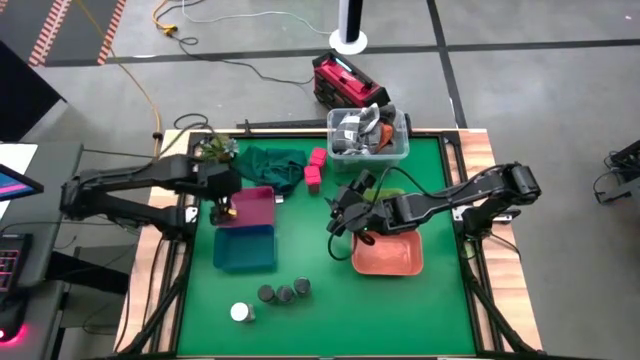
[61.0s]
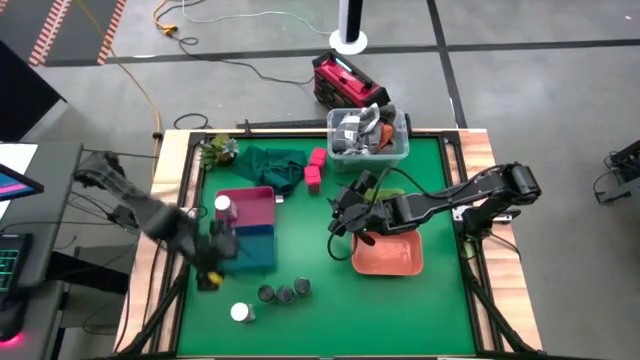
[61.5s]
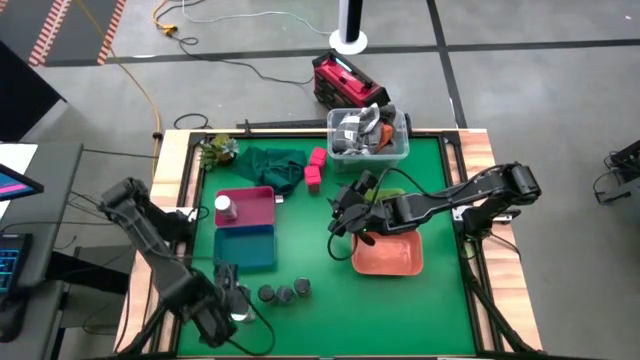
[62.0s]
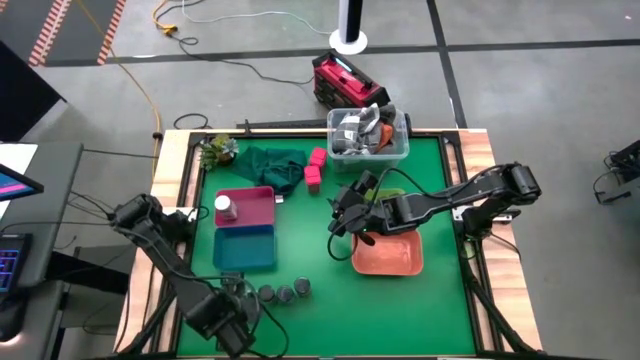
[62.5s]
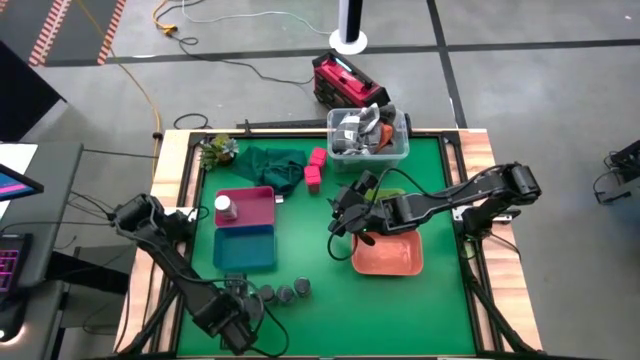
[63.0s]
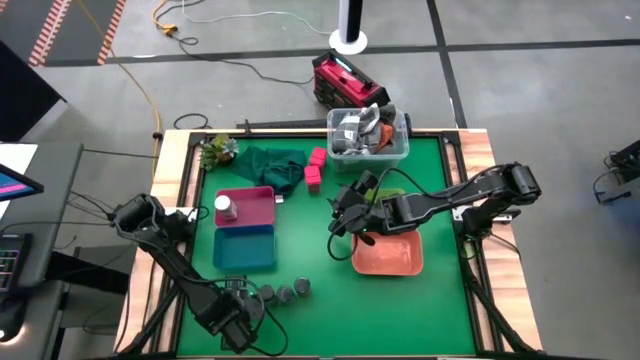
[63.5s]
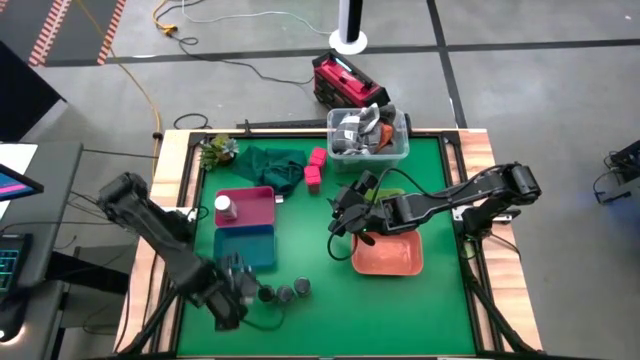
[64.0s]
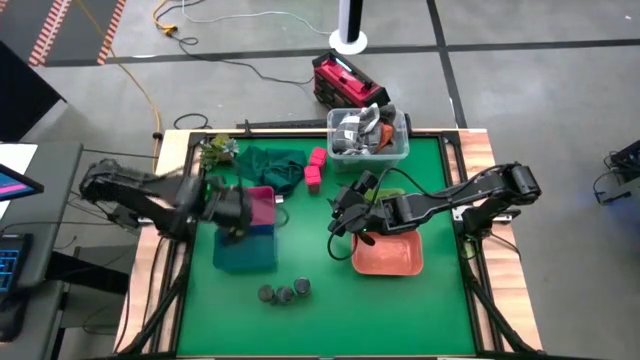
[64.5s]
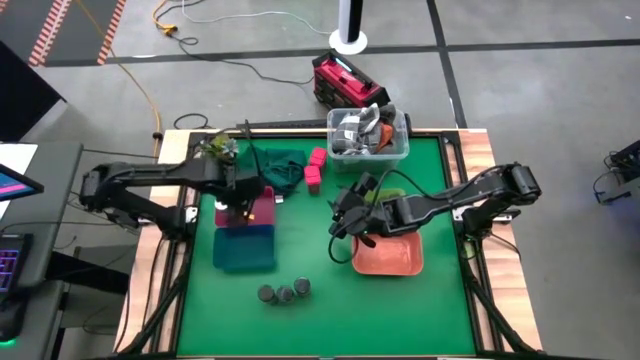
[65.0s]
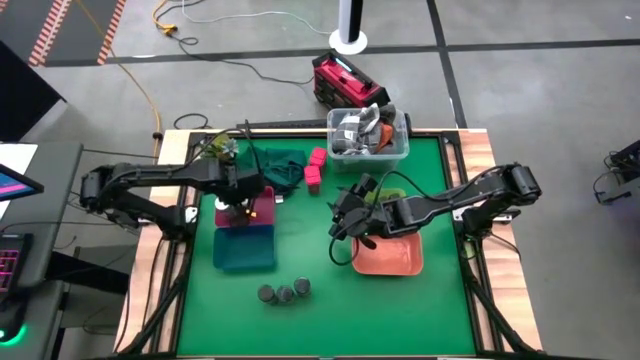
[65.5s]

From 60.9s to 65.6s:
Task: Sort spices by type
Put the white spice bottle into the red bin

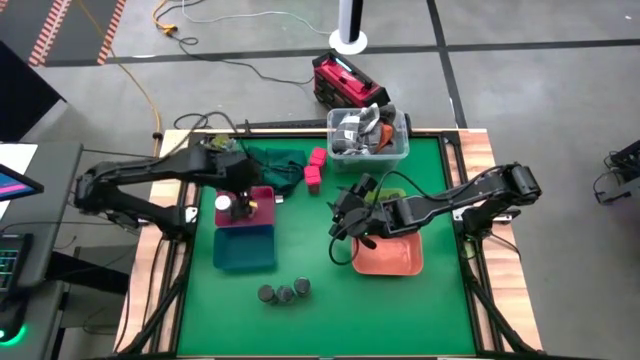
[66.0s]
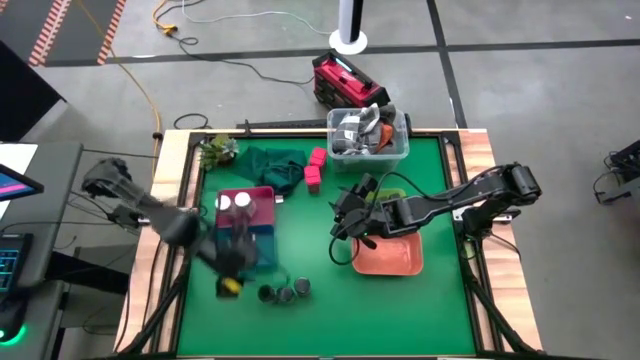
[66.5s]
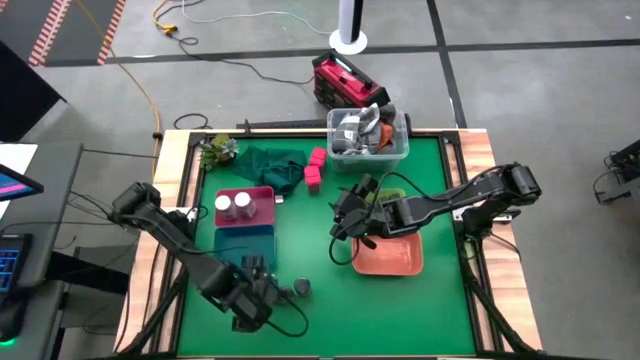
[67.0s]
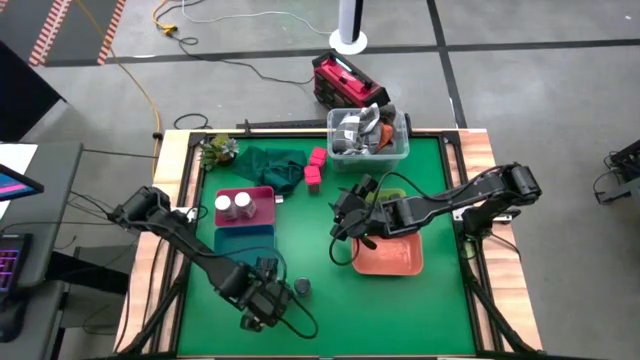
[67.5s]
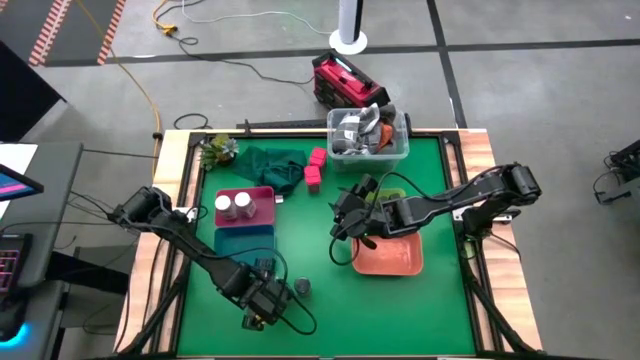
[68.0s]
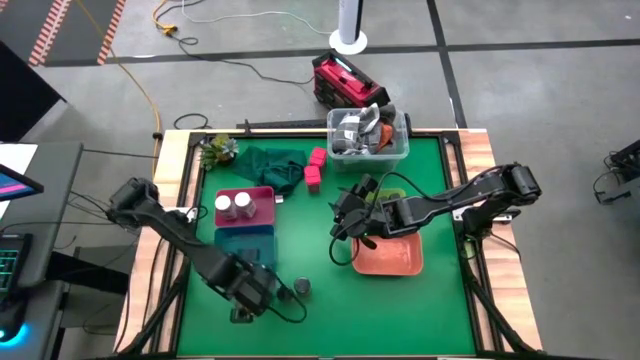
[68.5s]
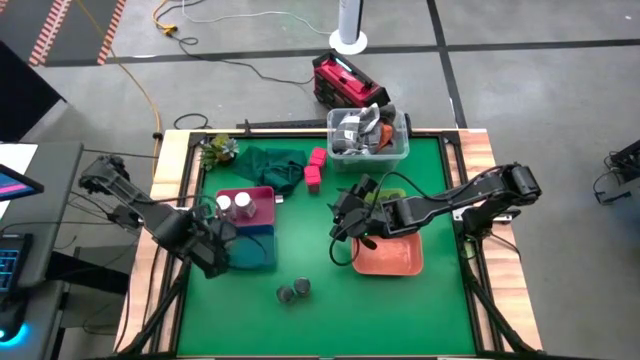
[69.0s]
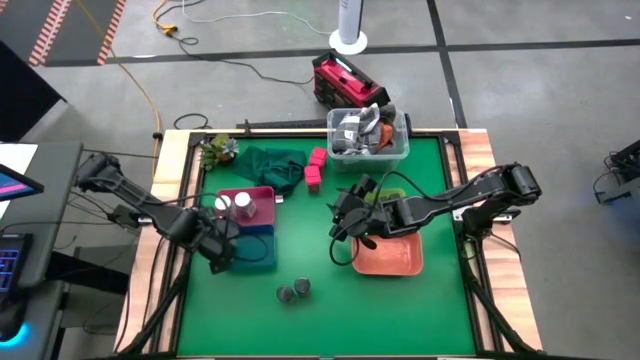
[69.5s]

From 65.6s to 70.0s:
Put the black spice bottle into the blue bin

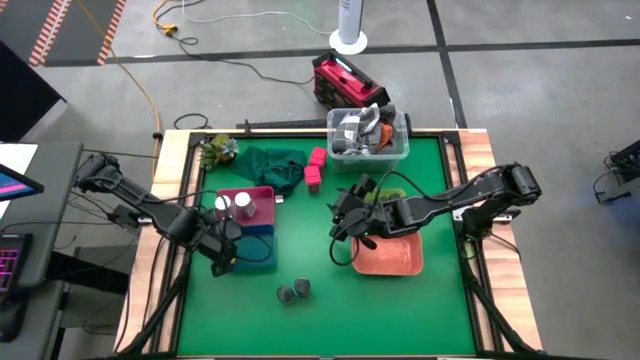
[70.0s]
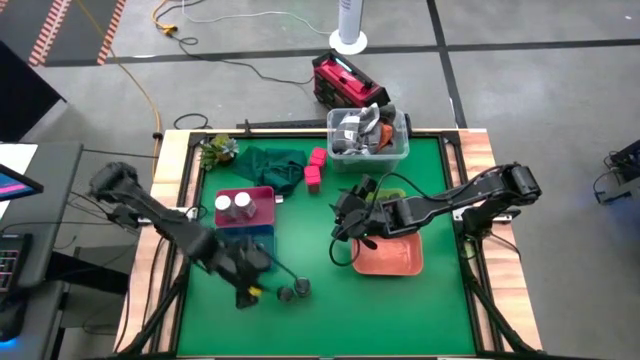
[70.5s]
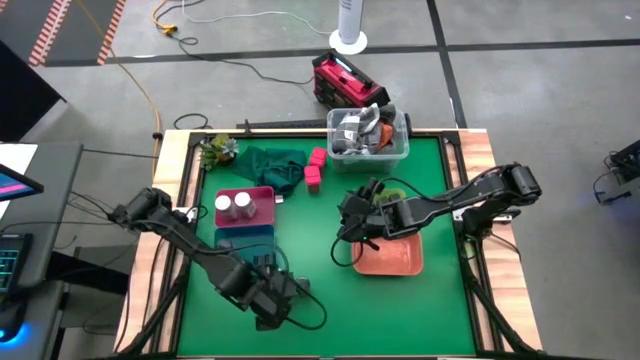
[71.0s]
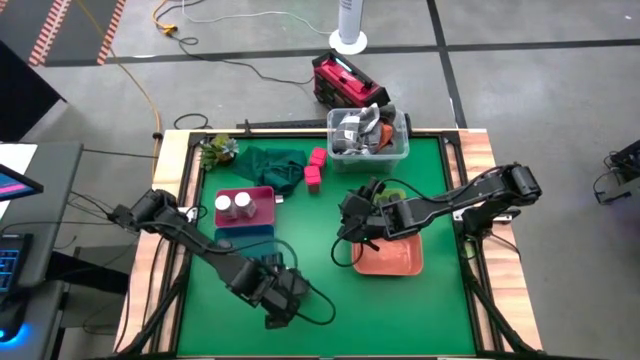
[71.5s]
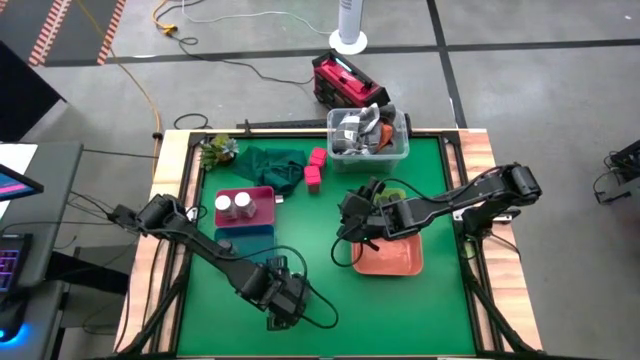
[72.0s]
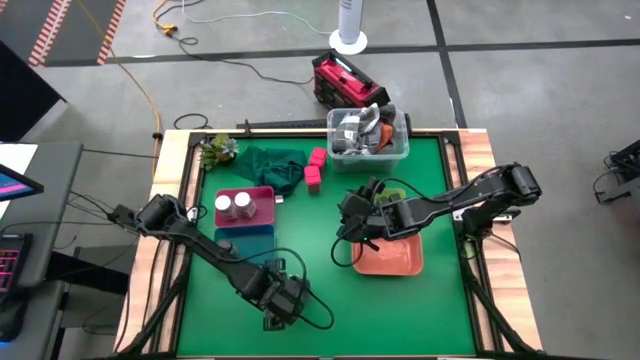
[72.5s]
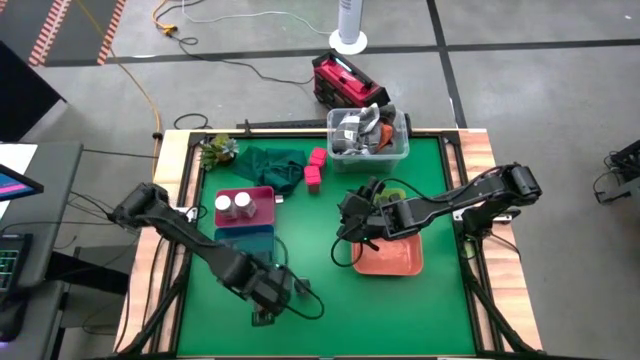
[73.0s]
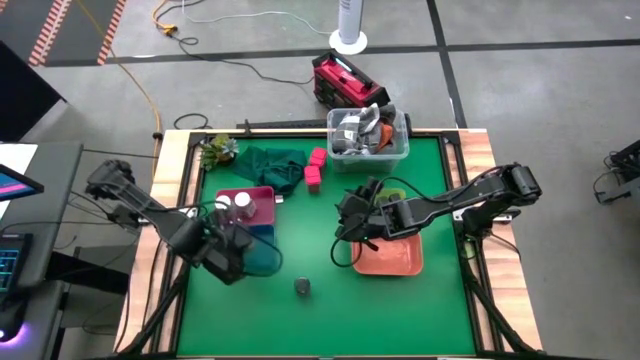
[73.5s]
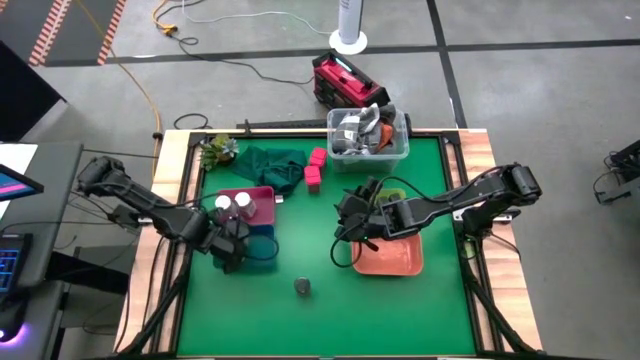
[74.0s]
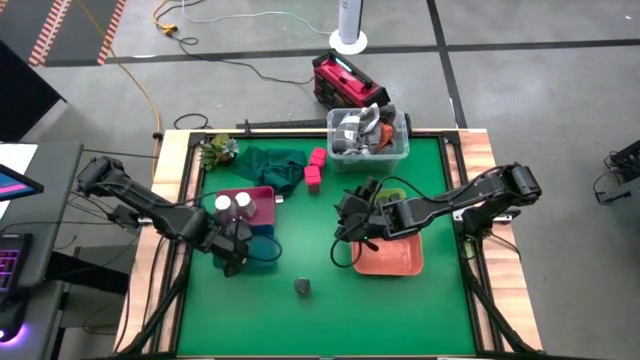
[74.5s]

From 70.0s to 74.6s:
Put the black spice bottle into the blue bin

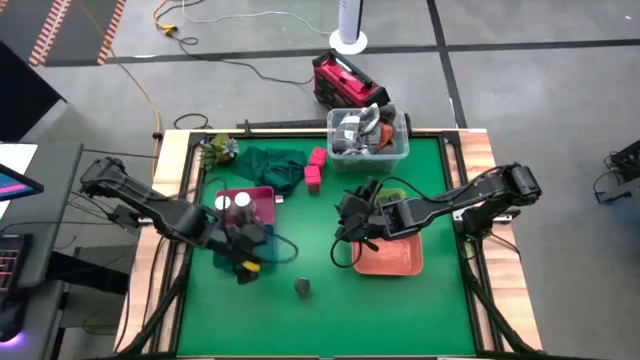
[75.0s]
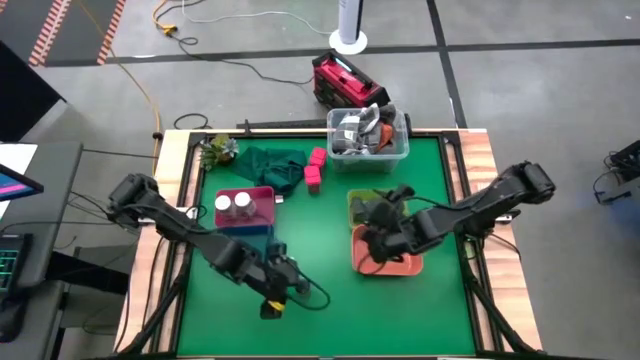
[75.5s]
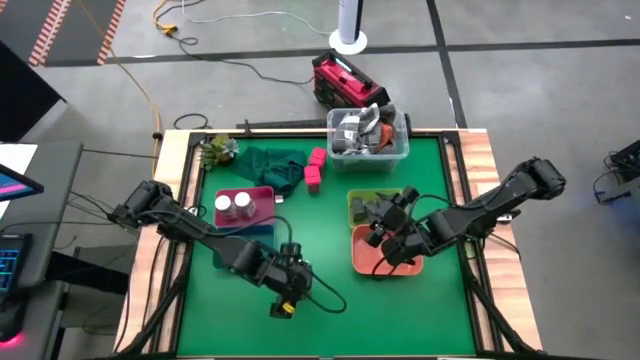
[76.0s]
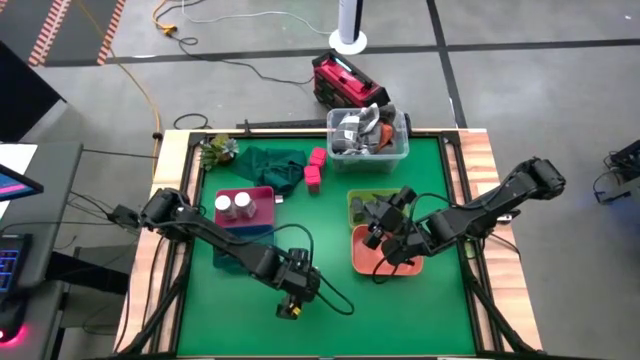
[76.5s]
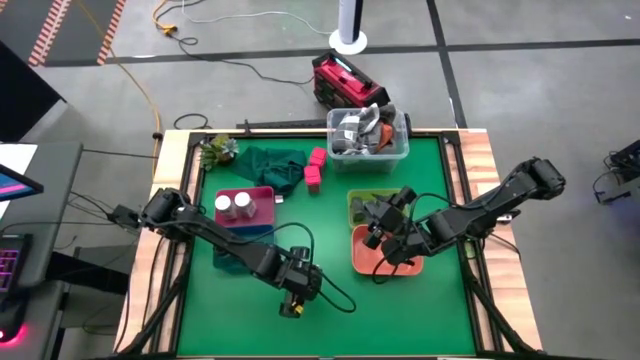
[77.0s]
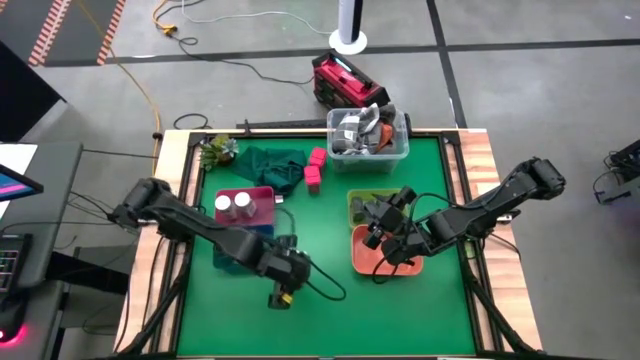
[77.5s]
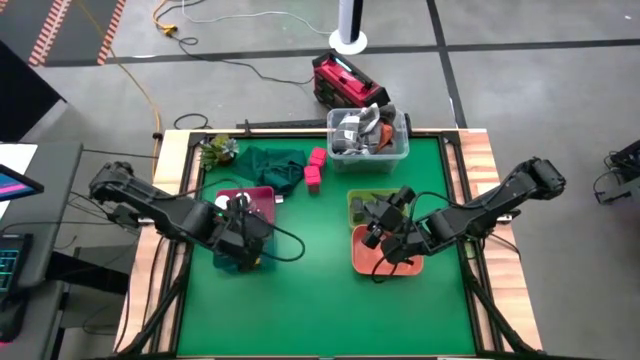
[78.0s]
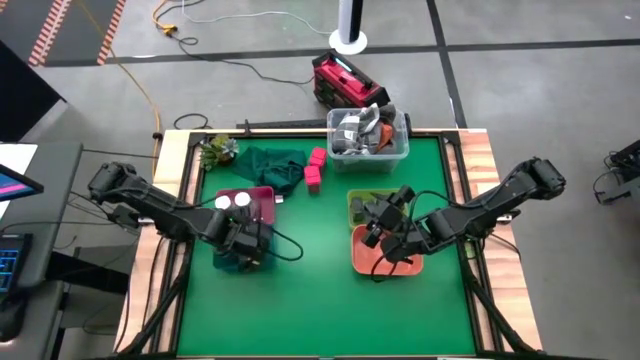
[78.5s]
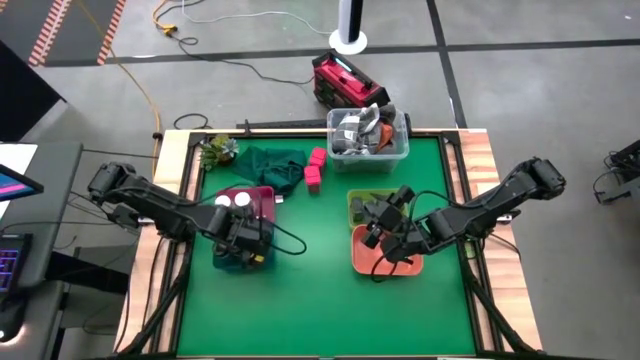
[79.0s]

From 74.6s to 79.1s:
Put the black spice bottle into the blue bin
